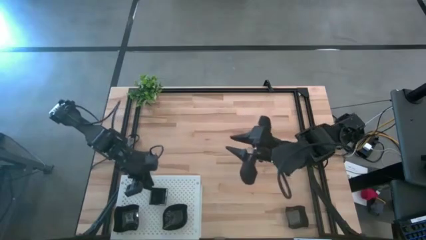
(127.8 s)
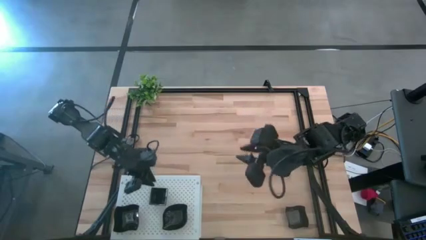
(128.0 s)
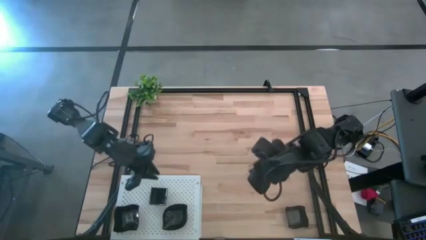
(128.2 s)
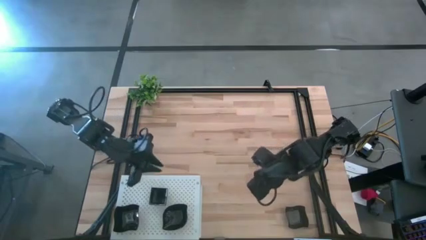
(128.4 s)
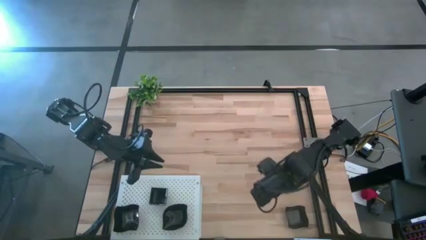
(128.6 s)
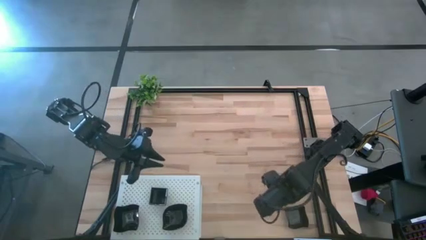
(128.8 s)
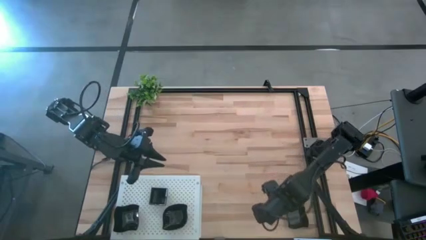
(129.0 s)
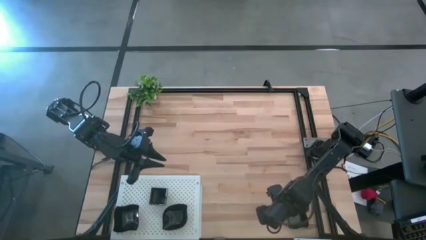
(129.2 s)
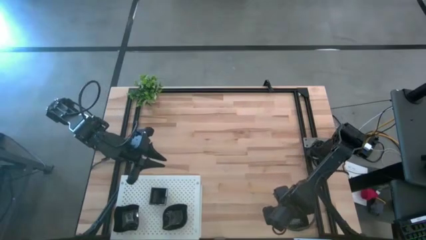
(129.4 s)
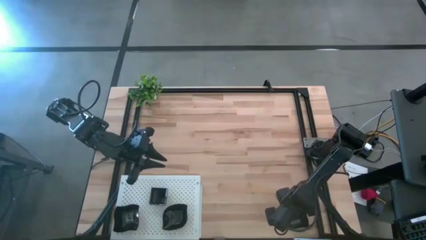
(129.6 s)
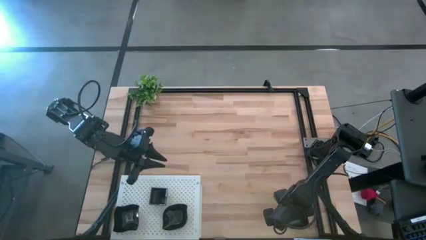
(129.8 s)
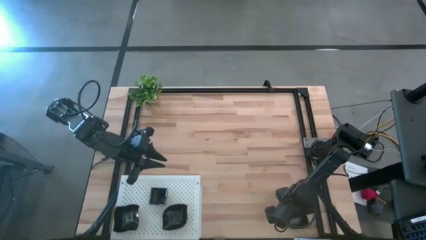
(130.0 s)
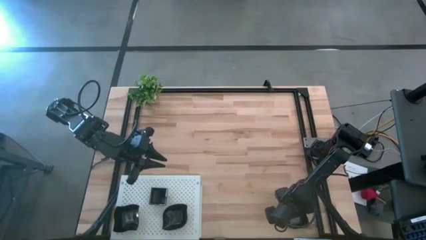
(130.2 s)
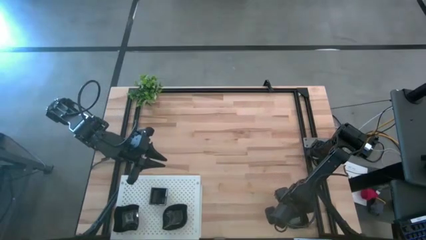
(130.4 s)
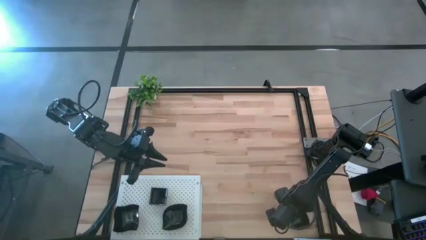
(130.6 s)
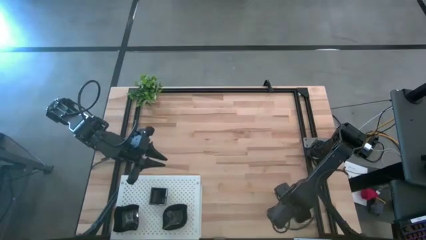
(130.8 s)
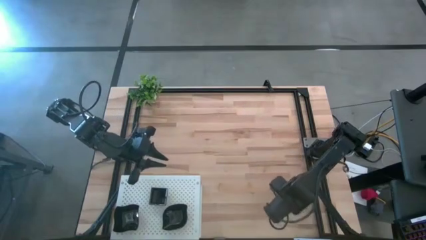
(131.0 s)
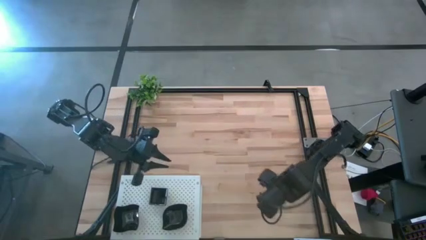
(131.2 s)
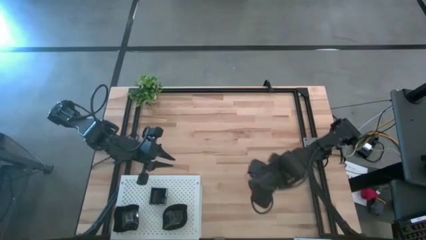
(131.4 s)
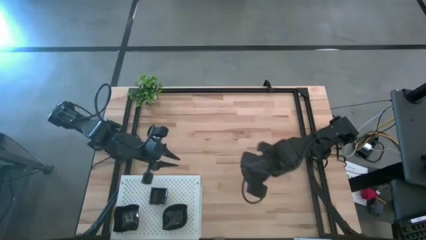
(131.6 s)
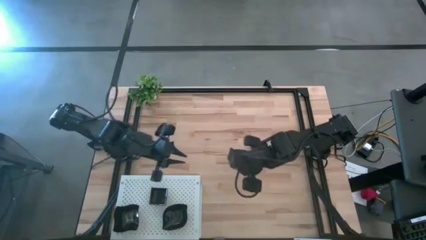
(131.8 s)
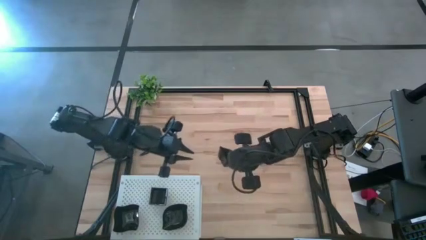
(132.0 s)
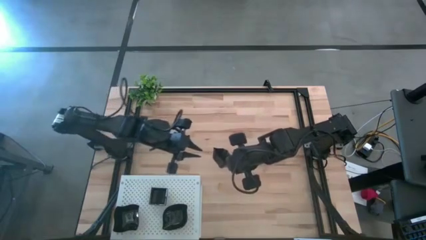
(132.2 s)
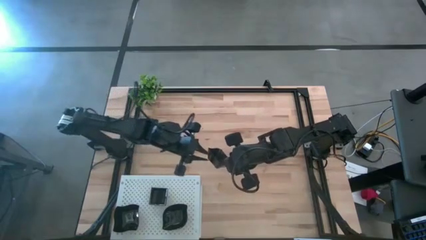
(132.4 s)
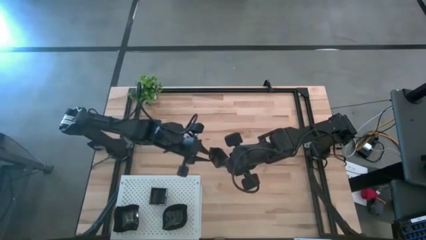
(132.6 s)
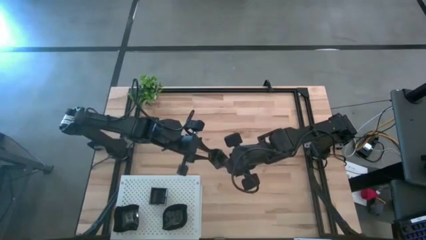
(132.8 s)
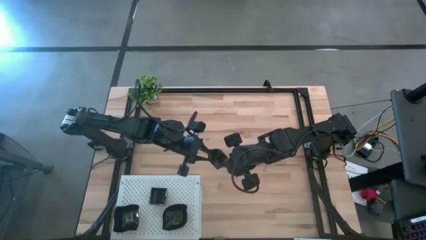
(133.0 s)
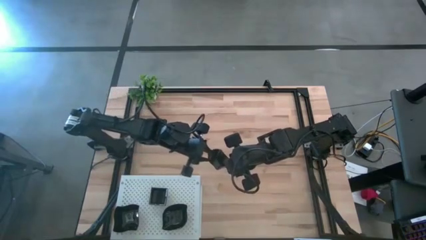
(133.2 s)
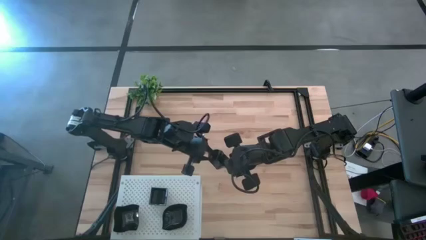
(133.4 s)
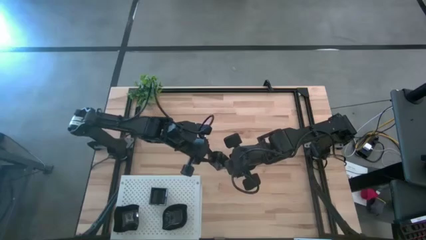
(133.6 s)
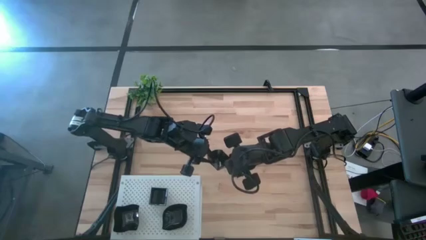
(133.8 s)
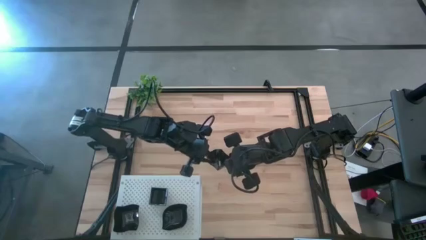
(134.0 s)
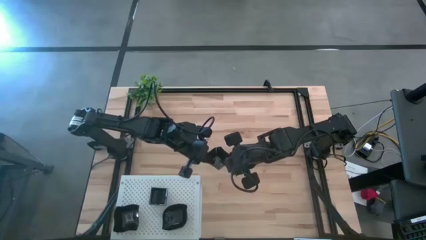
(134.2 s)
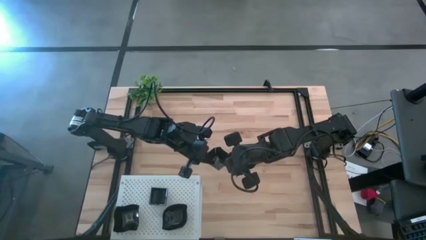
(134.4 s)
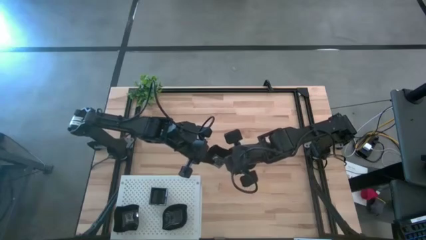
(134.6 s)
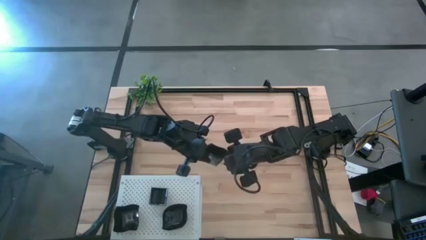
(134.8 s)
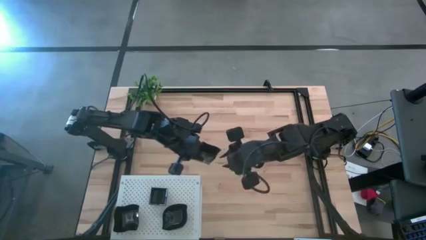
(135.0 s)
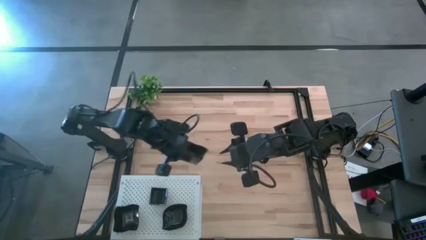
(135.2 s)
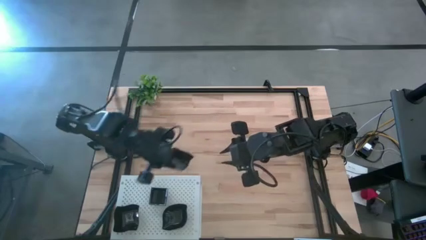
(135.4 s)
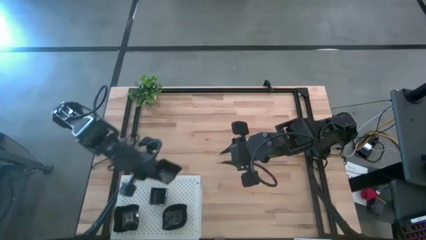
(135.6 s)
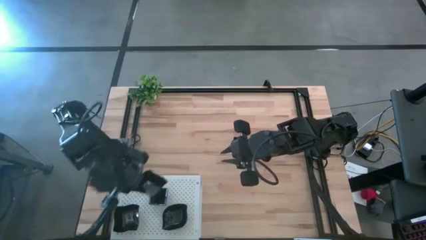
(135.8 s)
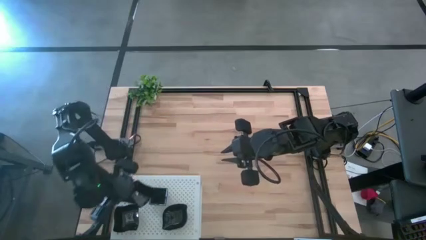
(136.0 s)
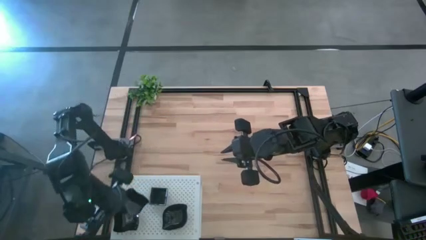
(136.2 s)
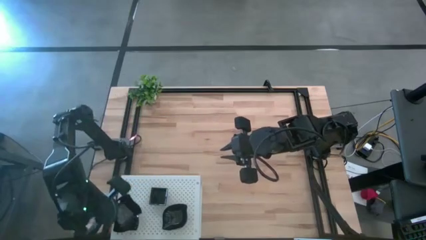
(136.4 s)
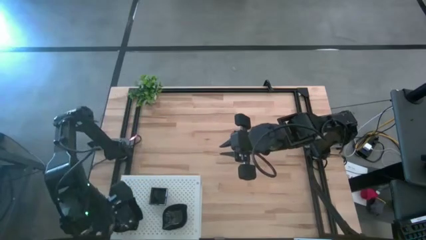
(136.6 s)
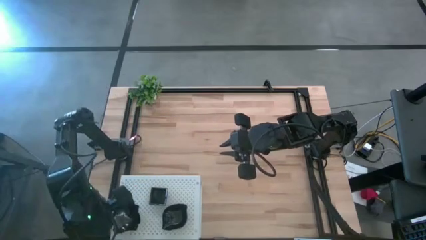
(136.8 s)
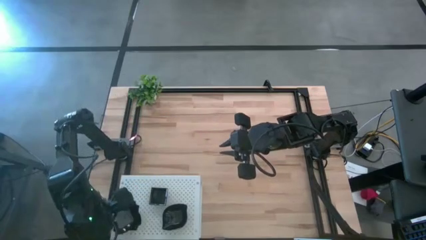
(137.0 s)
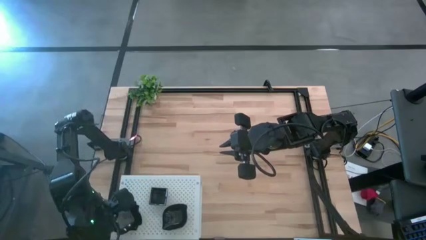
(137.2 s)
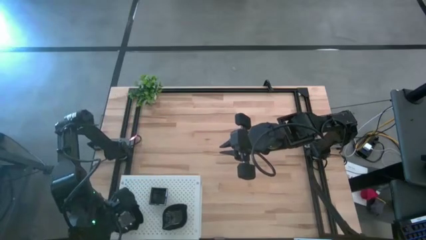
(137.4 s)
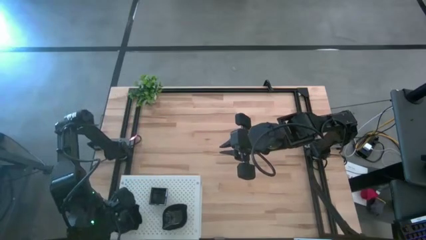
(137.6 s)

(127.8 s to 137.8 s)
Task: Pick & Place Mini shaped plates
Stack the distorted square plate on top of the distorted square plate on the shelf
